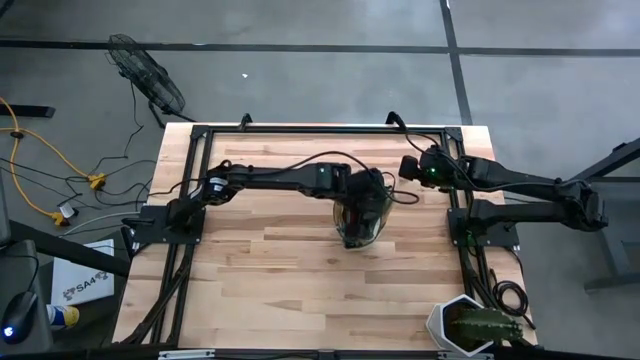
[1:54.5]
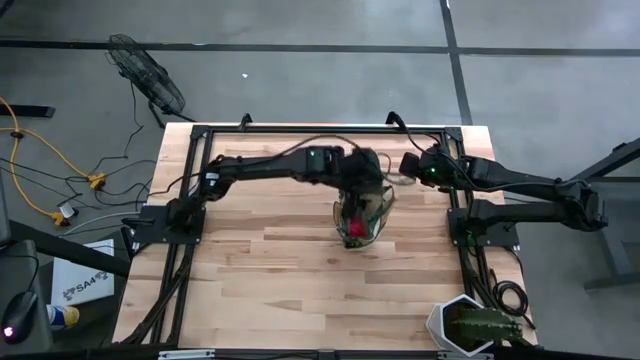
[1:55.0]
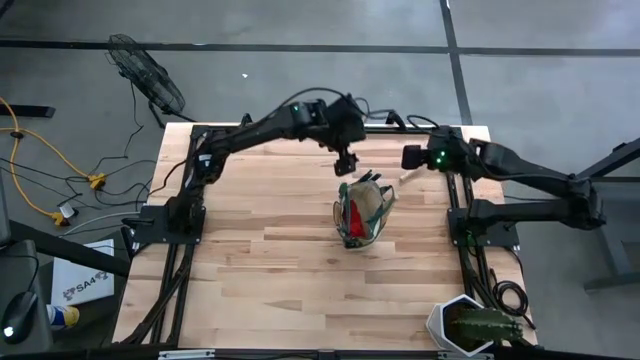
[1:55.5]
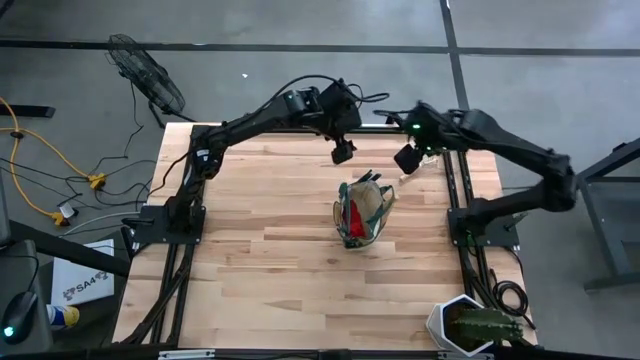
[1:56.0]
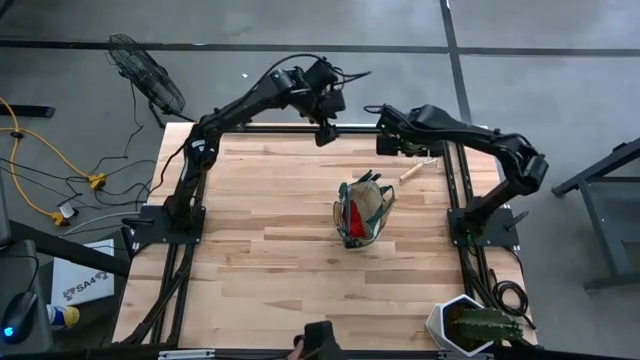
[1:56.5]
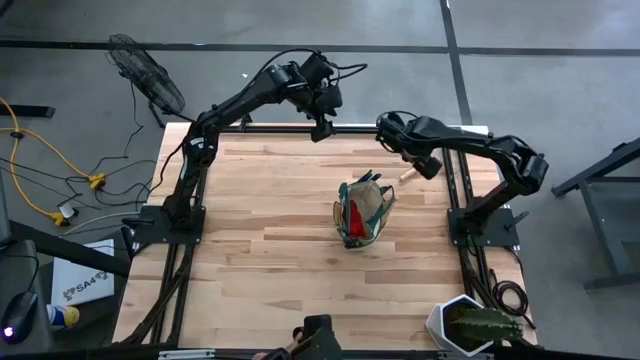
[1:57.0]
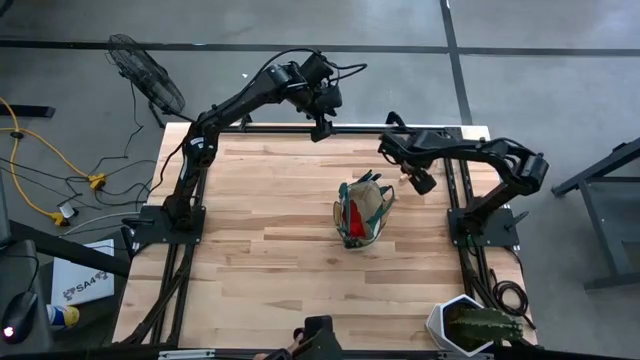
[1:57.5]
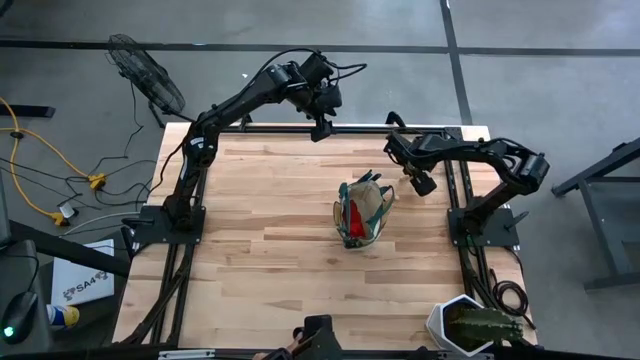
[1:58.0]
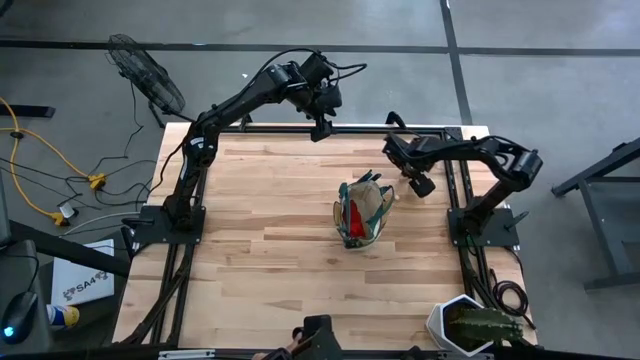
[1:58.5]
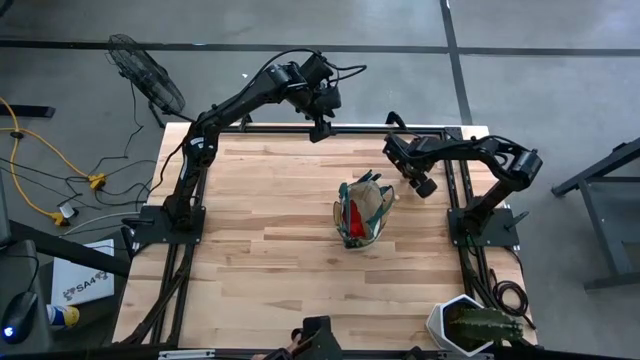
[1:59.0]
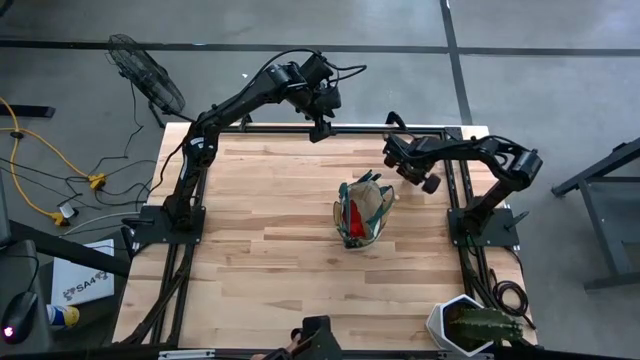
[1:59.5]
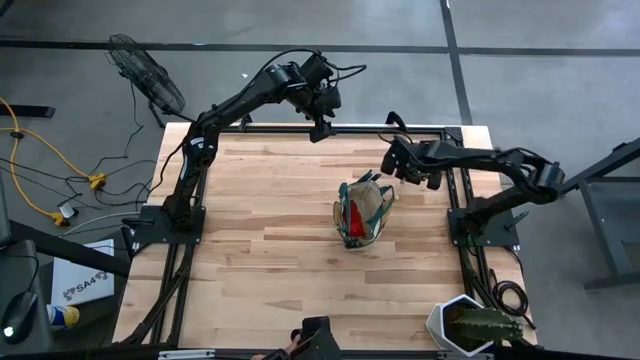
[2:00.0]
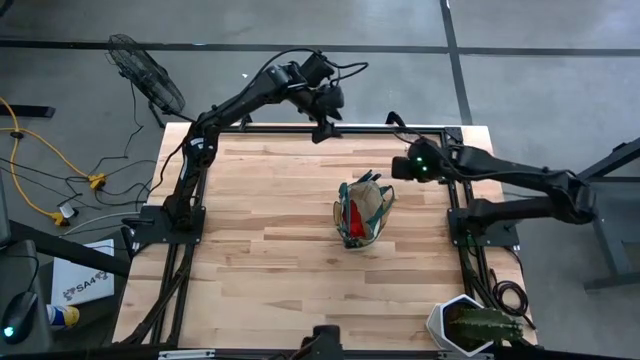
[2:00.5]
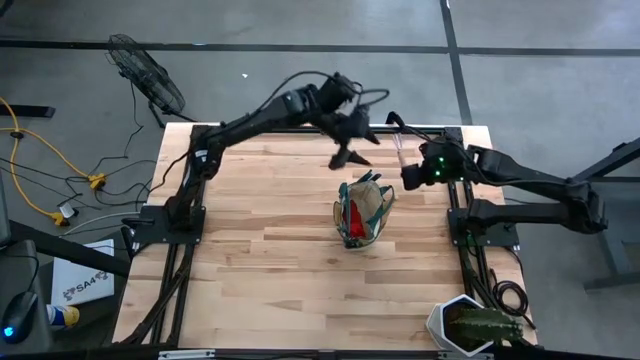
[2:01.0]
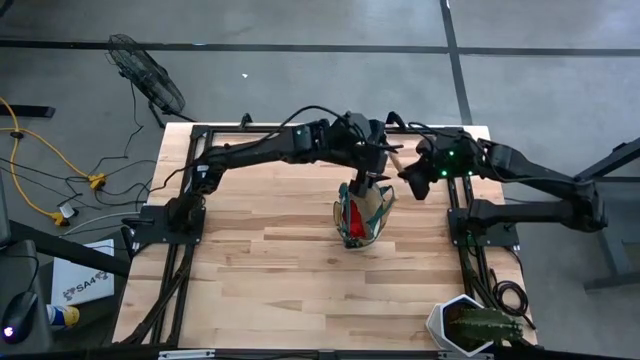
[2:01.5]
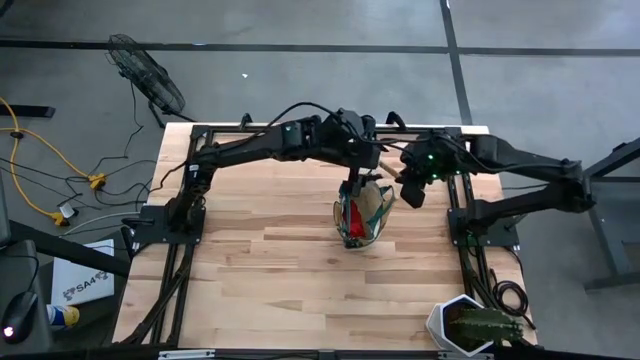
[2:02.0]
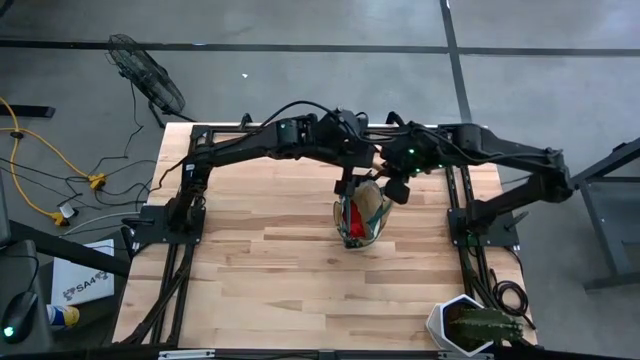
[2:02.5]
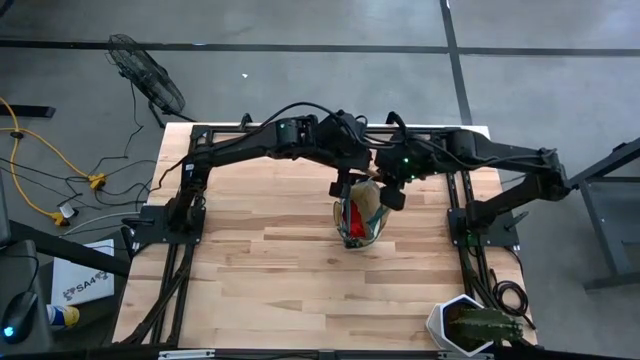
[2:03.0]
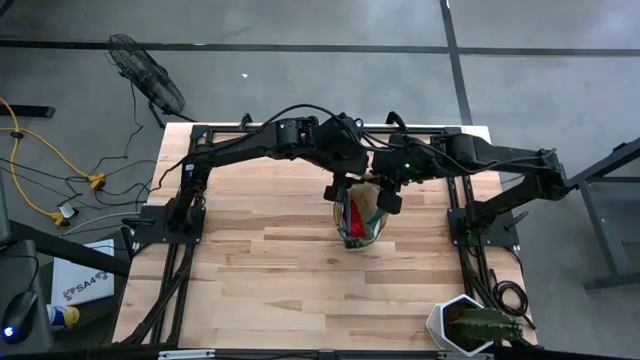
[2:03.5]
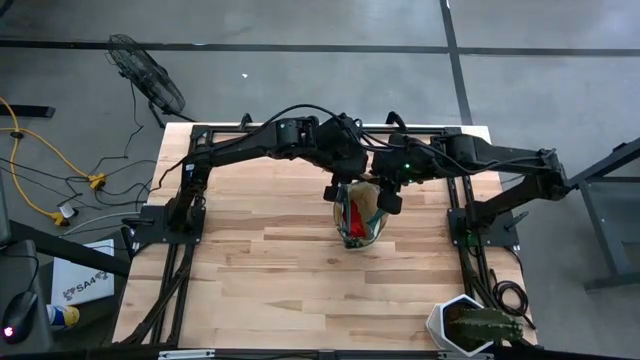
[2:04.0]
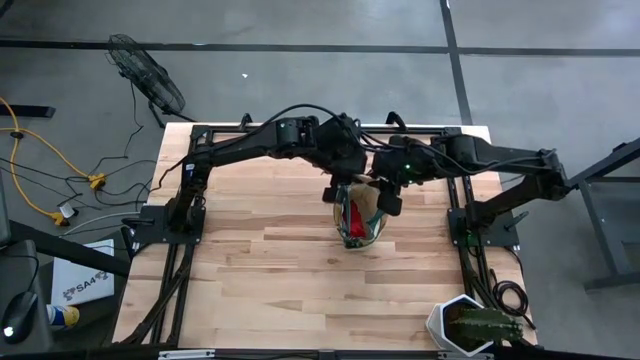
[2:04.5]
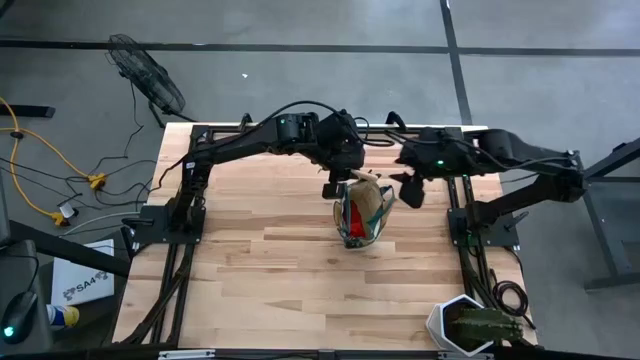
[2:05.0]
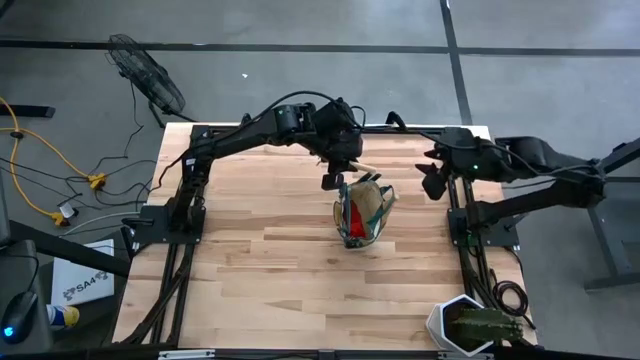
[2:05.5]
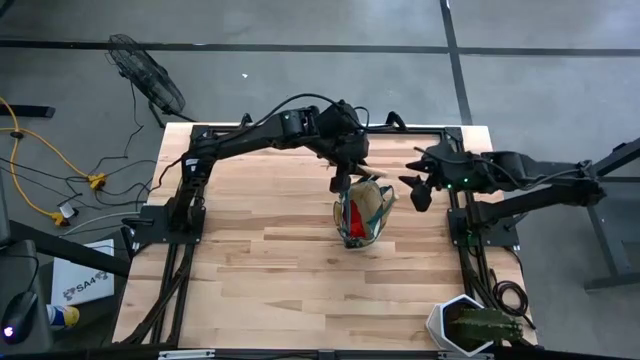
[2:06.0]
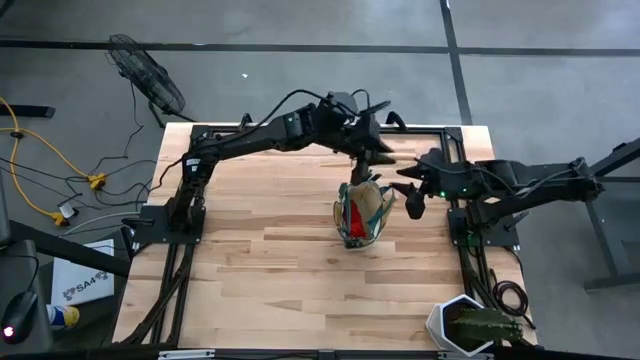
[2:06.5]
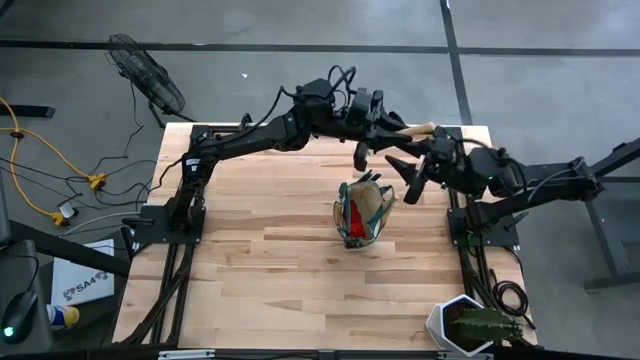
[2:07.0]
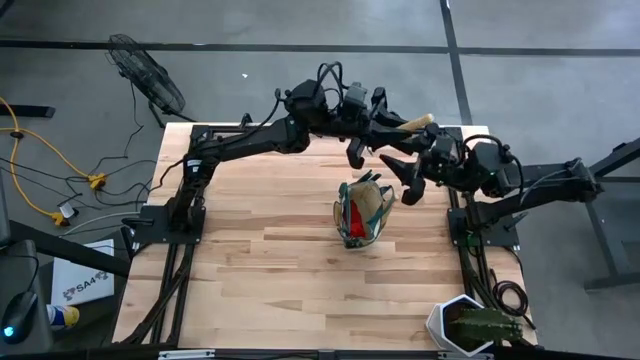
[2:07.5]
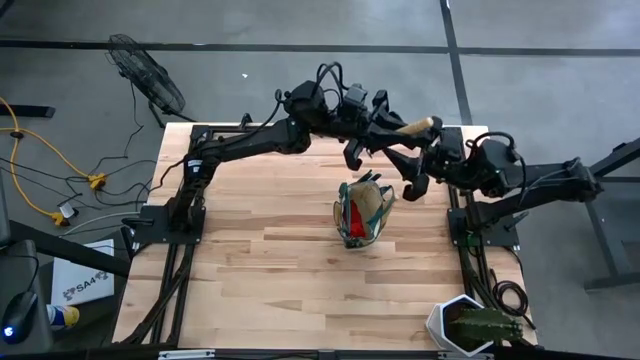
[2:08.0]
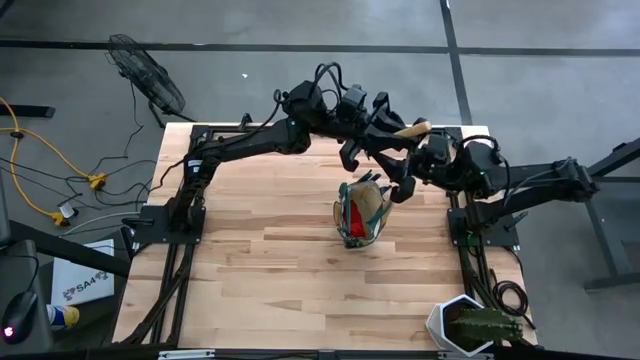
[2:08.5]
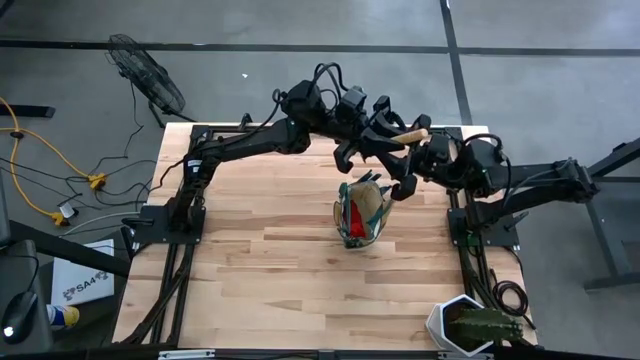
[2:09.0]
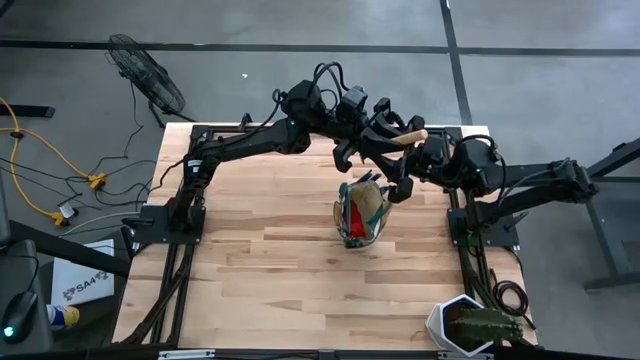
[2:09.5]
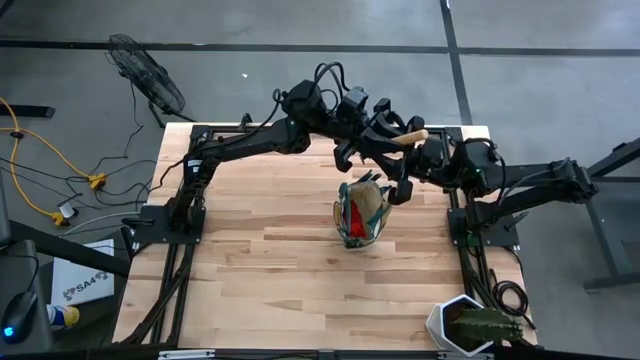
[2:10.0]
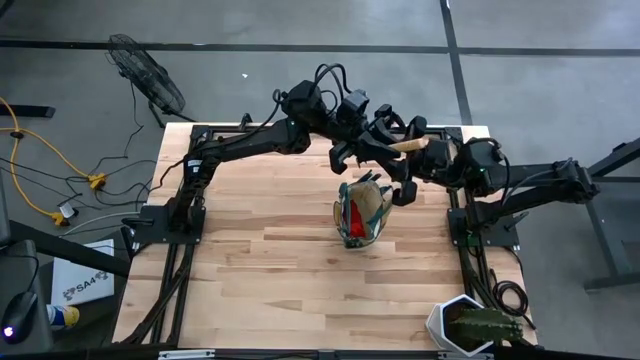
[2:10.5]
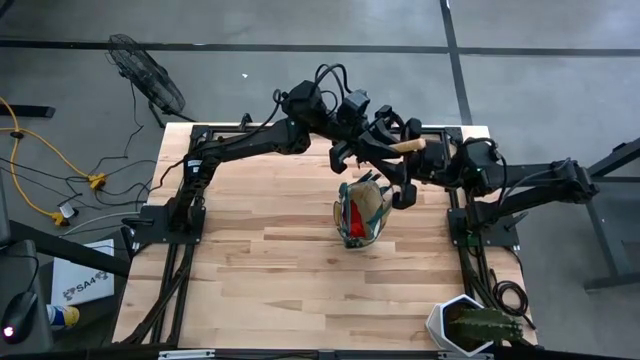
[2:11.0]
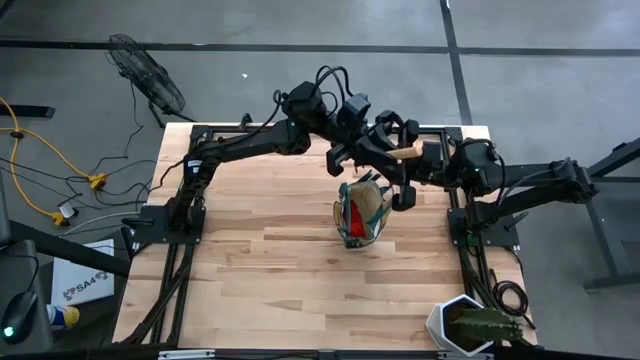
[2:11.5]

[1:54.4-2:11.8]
Task: Pick & Place Garden tools in Gardening bag
Put the brown hand rake into the white gardening bag

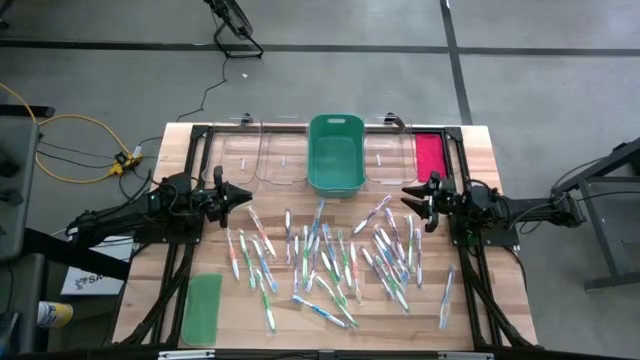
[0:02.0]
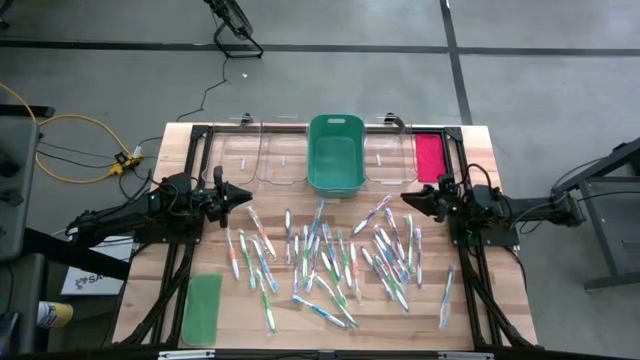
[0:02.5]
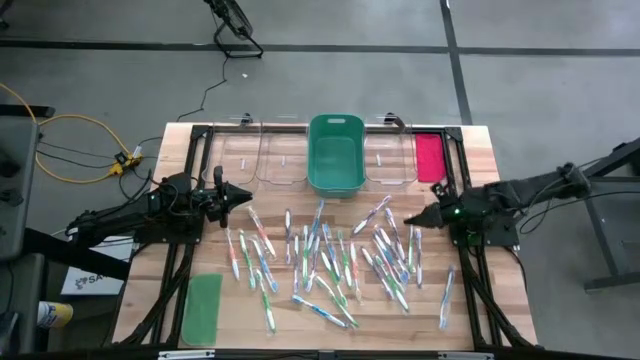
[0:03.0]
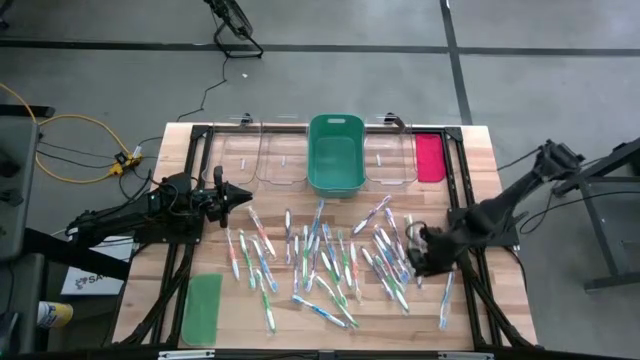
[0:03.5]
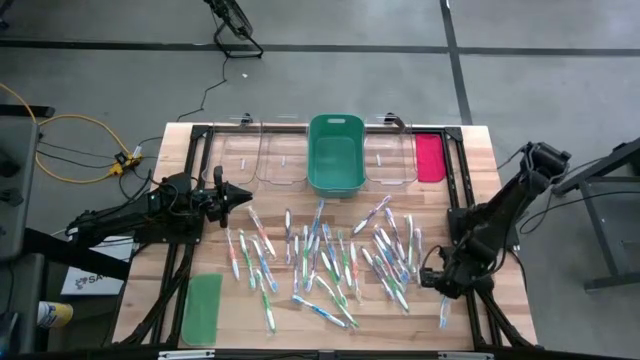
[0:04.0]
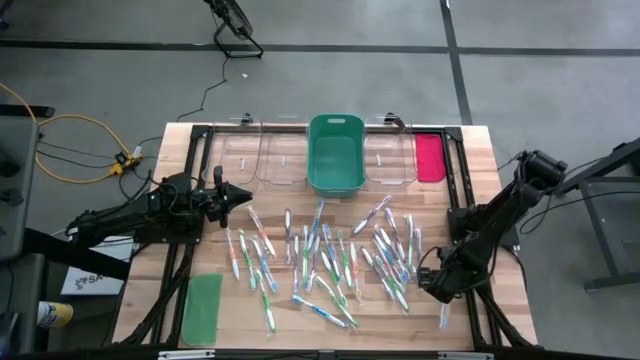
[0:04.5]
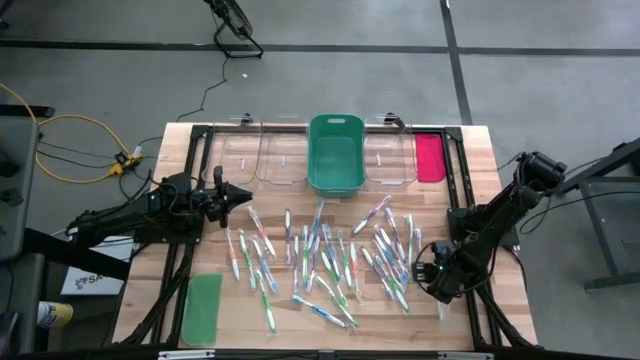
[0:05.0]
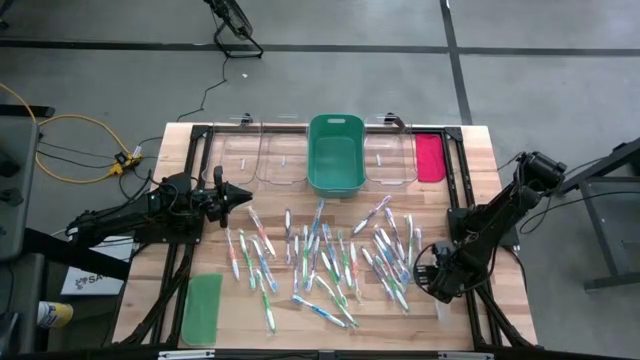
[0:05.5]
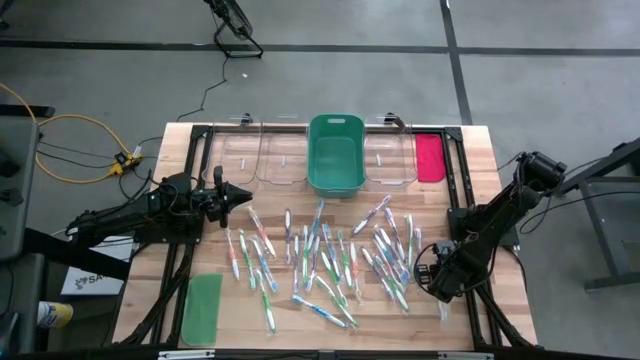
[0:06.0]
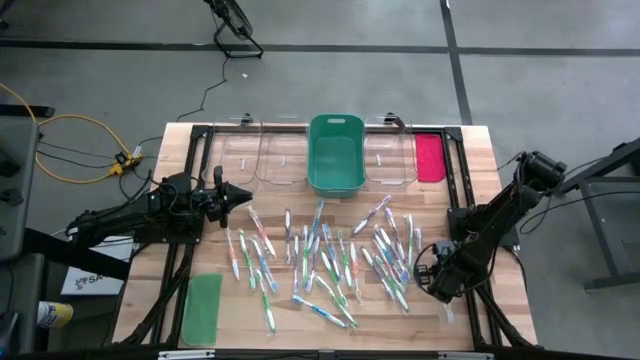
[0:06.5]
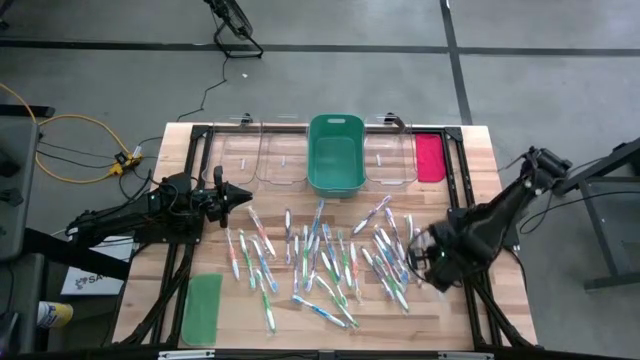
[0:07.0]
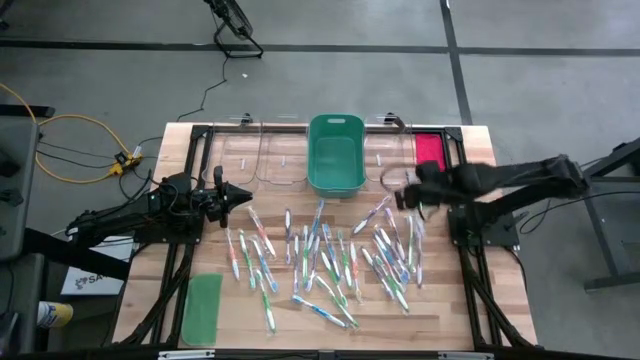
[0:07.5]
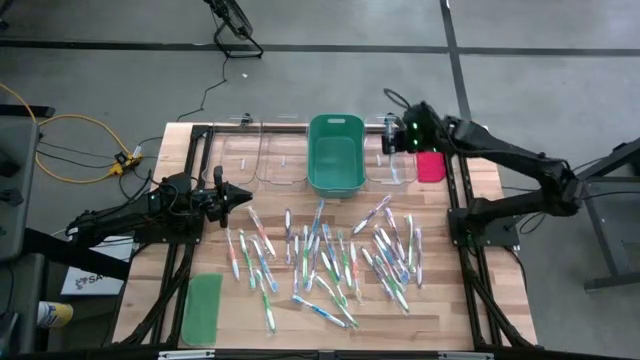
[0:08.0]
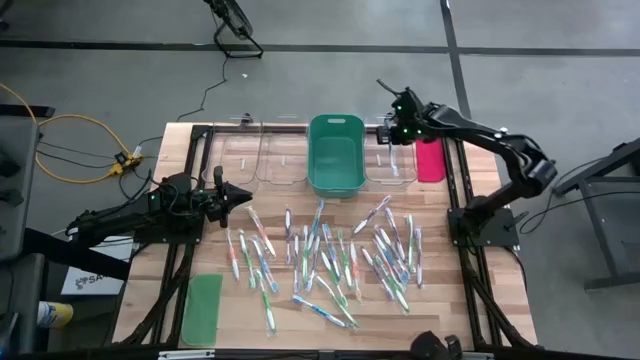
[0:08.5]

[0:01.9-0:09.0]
Task: Pick & Place Toothbrushes
Put the blue toothbrush into the right transparent bin
